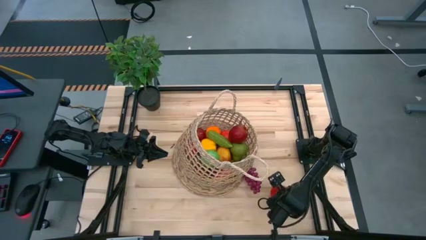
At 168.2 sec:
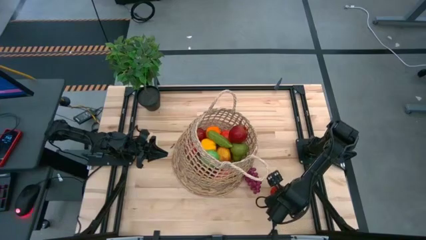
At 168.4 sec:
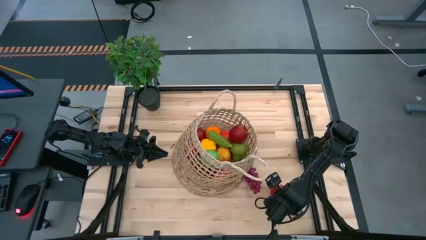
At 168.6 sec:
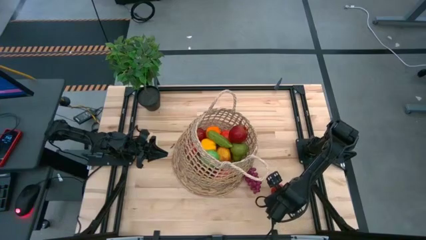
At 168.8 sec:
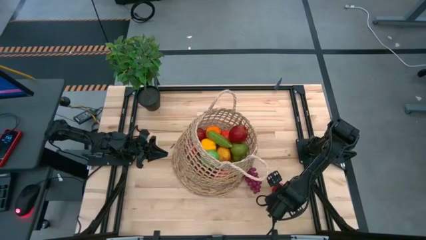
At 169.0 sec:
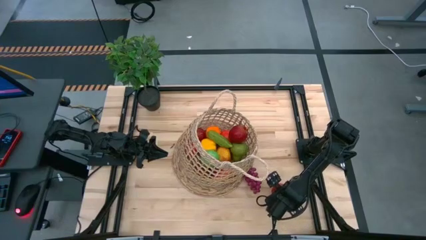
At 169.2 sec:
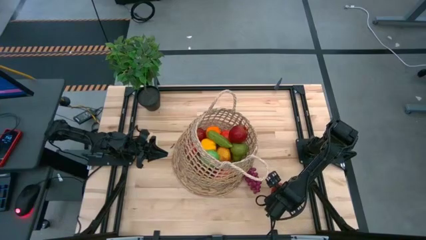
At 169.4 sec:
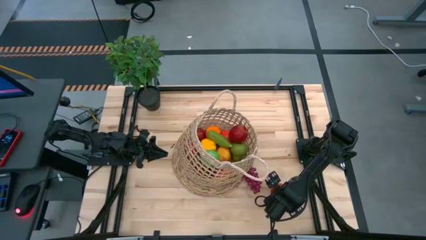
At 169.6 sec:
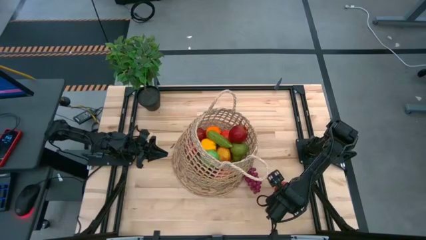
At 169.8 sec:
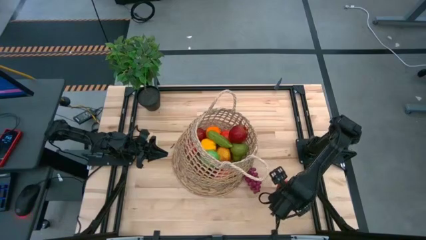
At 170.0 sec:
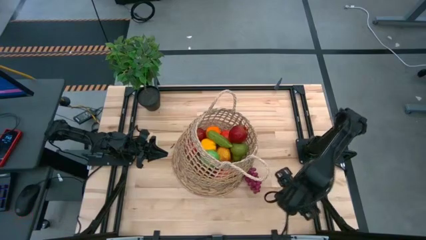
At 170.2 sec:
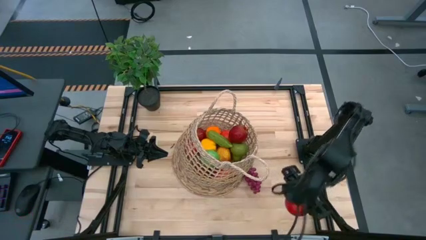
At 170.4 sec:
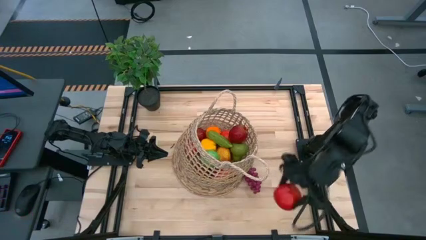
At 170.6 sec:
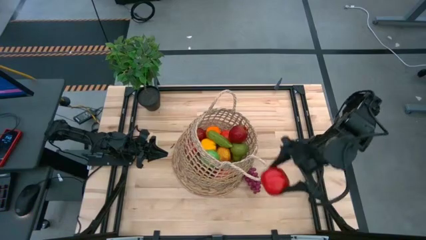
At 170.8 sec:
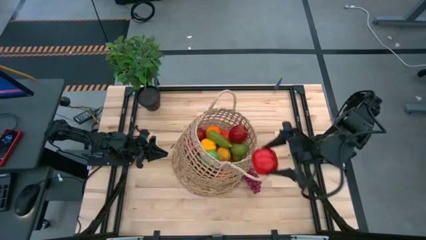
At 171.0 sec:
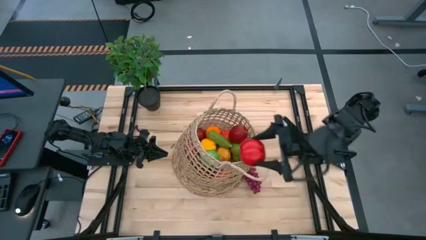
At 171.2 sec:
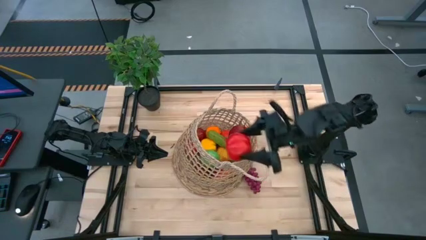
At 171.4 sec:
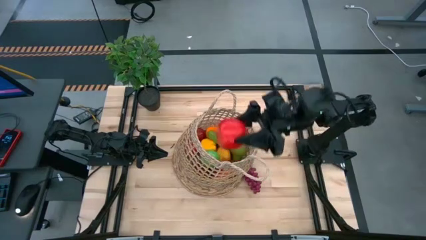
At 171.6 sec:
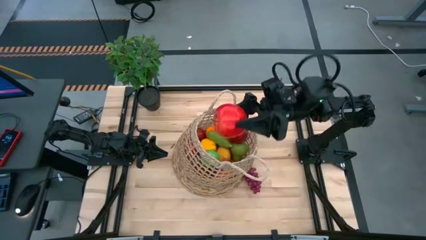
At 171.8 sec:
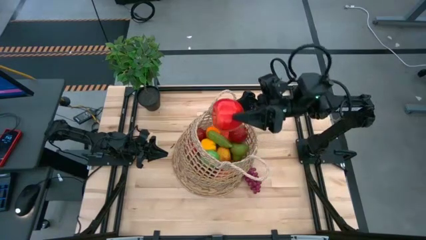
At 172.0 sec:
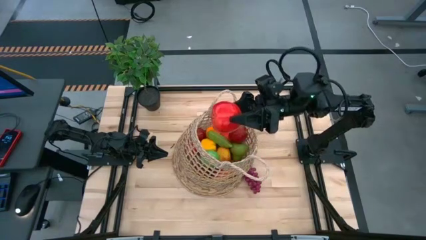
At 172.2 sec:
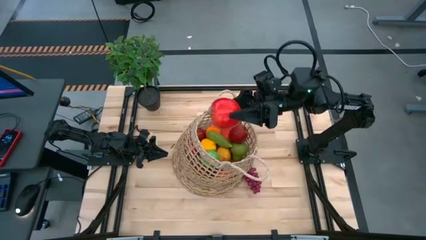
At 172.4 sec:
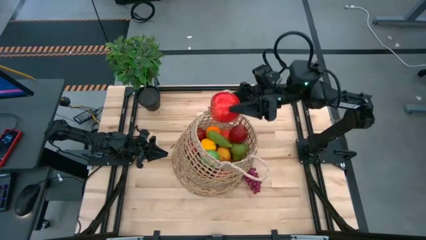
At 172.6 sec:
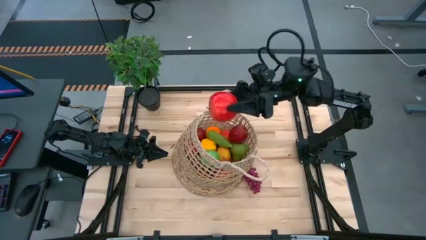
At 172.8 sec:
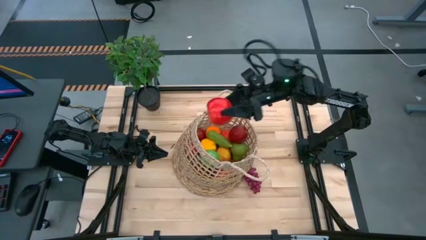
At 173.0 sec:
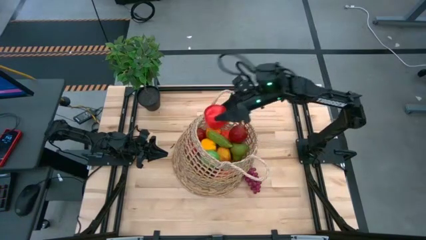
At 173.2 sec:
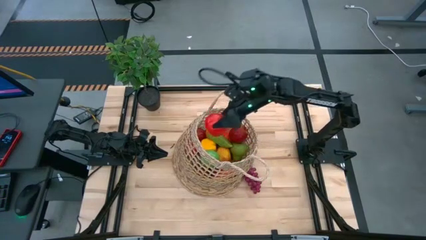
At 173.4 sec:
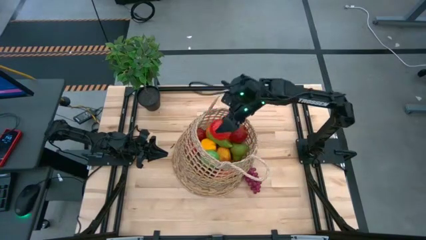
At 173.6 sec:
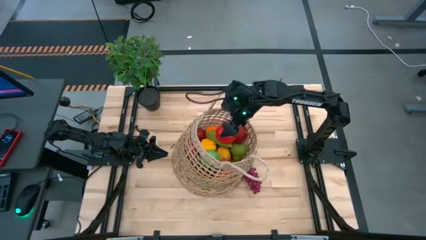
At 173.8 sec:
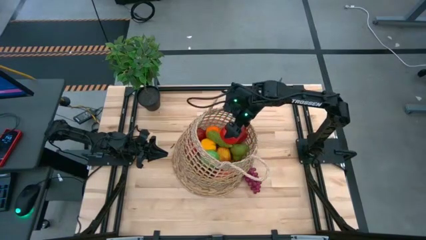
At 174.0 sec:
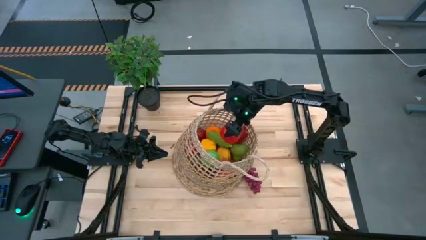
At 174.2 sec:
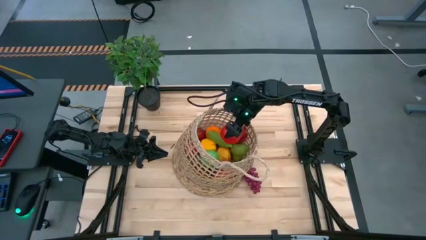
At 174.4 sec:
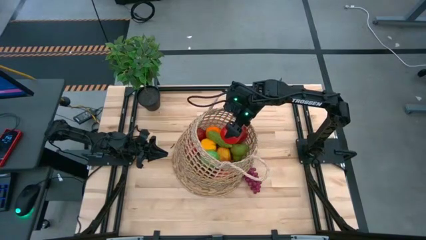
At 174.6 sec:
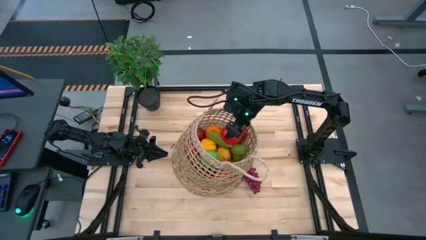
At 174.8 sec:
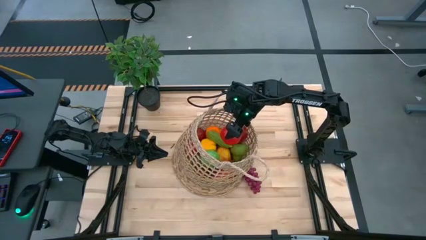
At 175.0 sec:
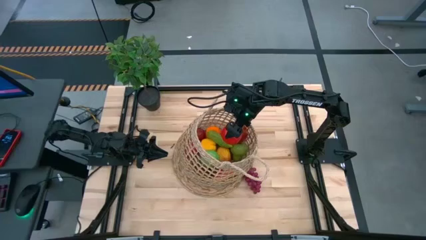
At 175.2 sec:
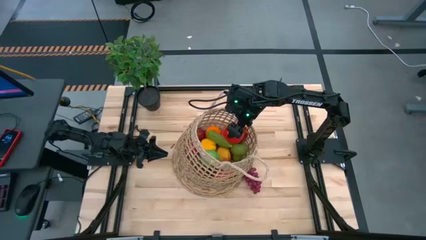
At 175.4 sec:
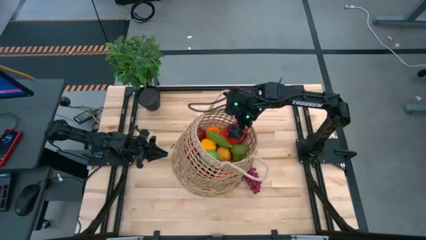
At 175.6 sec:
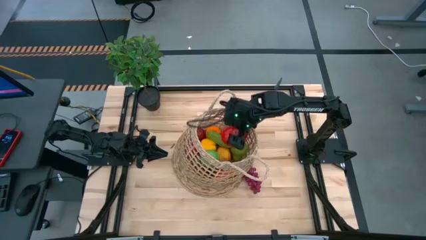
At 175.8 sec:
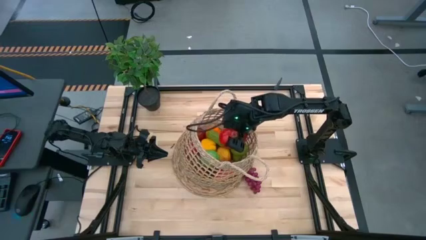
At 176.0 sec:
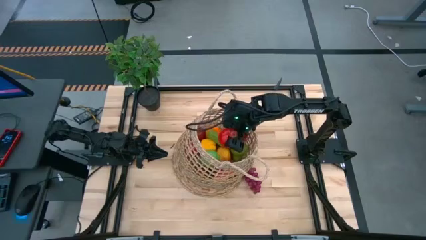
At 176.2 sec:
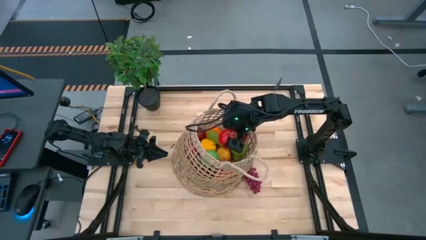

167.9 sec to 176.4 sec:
Task: Build produce basket
Put the red apple into the brown basket

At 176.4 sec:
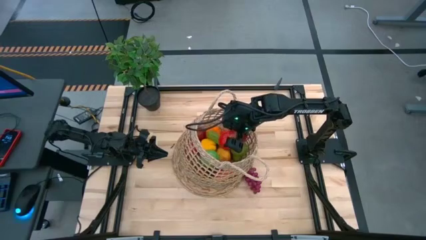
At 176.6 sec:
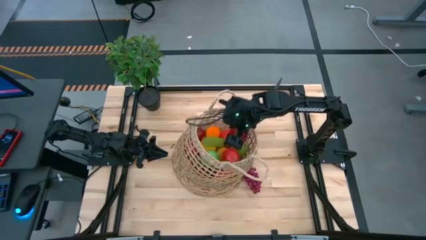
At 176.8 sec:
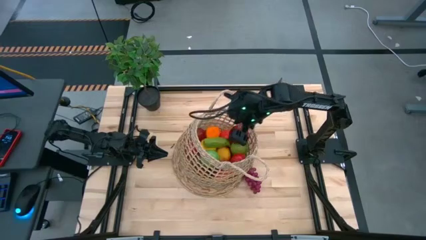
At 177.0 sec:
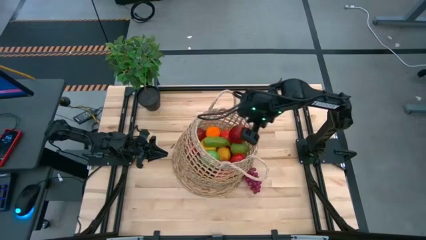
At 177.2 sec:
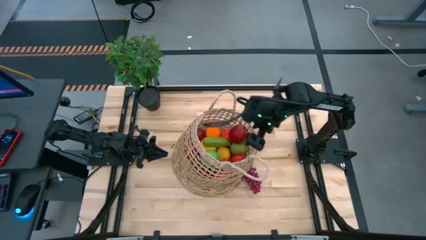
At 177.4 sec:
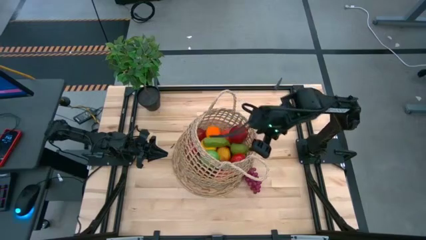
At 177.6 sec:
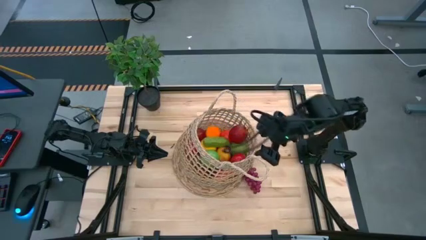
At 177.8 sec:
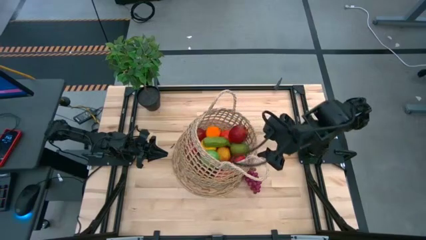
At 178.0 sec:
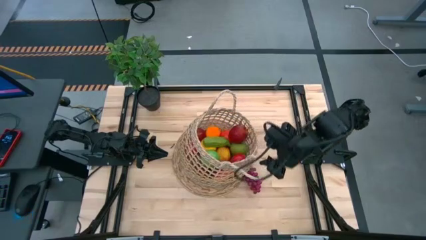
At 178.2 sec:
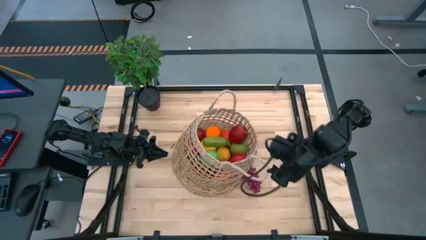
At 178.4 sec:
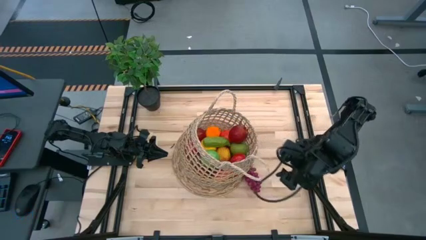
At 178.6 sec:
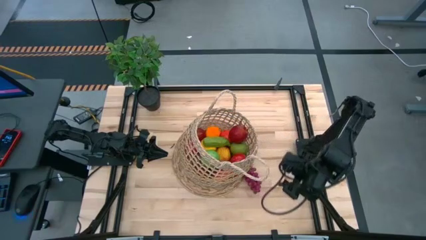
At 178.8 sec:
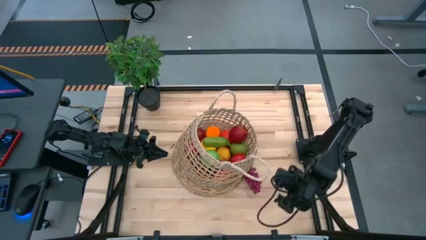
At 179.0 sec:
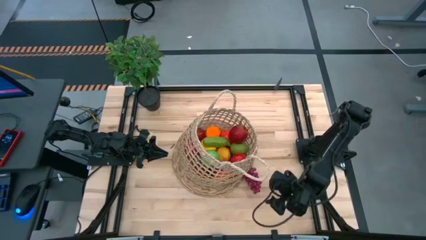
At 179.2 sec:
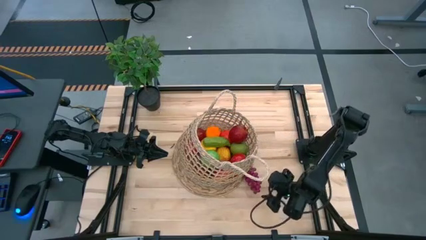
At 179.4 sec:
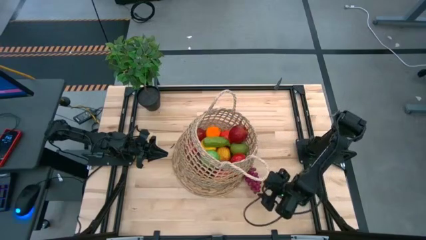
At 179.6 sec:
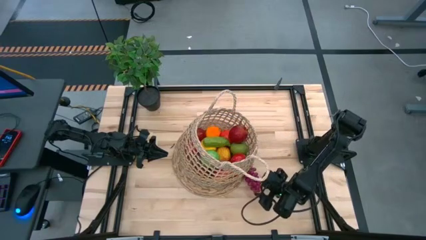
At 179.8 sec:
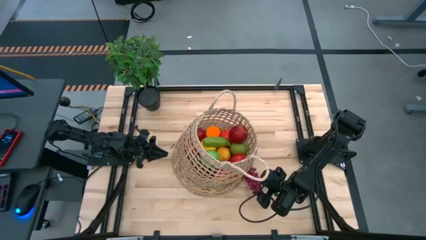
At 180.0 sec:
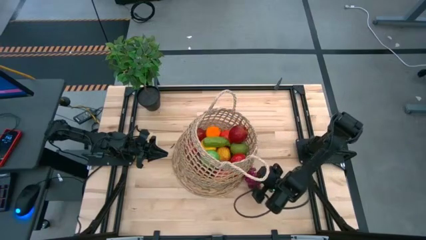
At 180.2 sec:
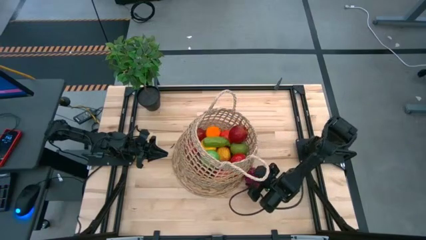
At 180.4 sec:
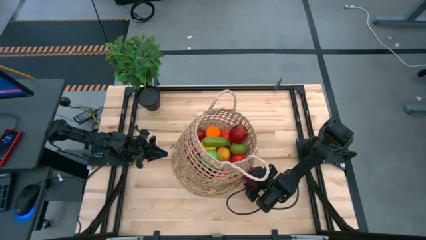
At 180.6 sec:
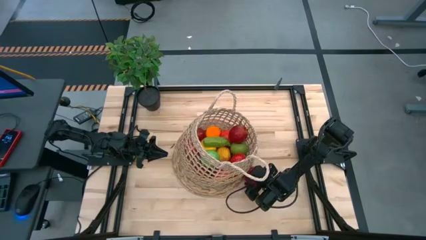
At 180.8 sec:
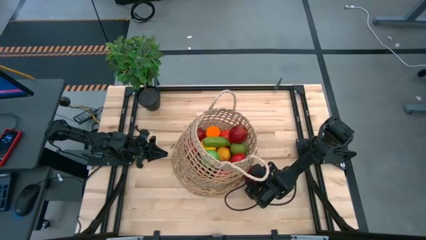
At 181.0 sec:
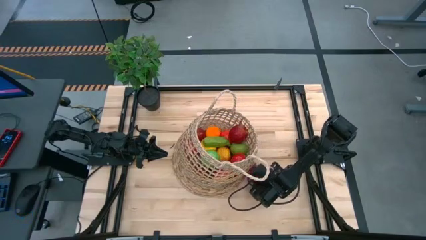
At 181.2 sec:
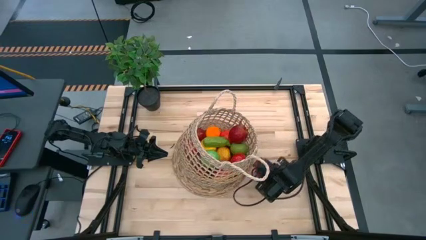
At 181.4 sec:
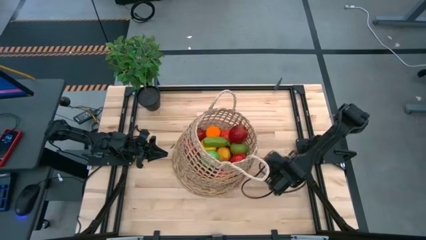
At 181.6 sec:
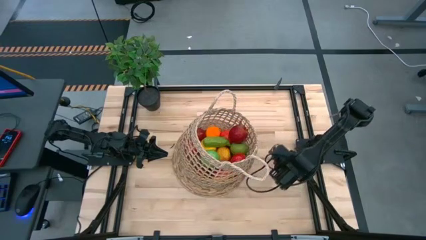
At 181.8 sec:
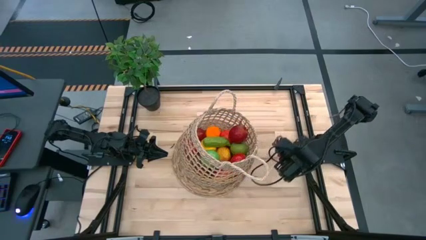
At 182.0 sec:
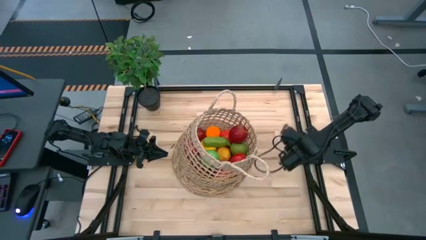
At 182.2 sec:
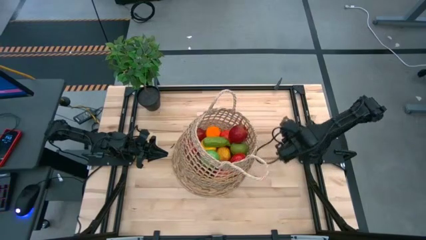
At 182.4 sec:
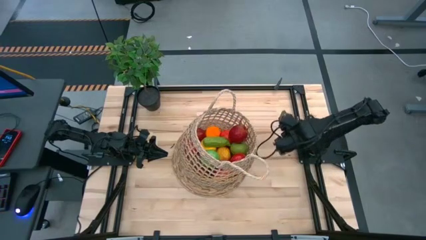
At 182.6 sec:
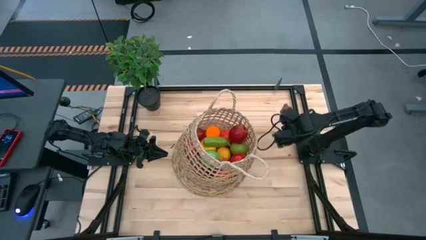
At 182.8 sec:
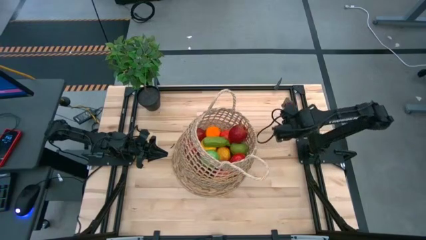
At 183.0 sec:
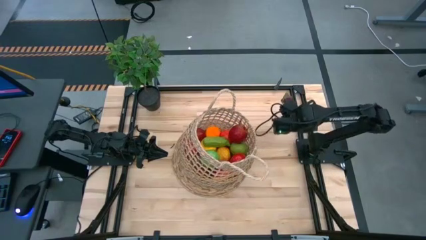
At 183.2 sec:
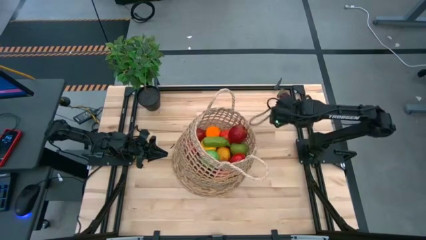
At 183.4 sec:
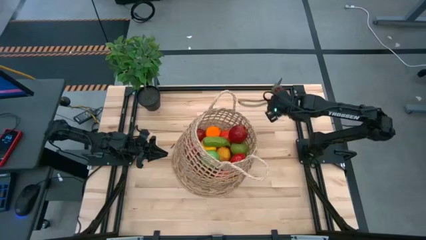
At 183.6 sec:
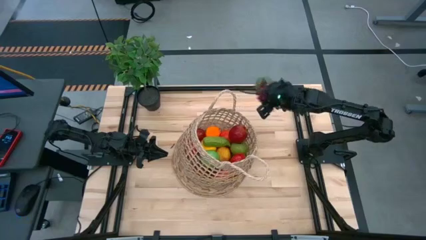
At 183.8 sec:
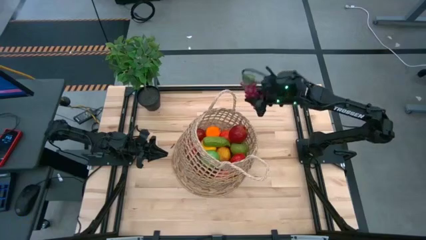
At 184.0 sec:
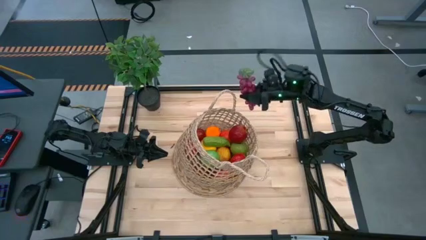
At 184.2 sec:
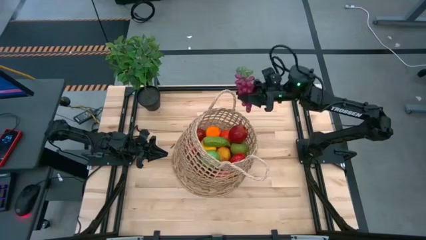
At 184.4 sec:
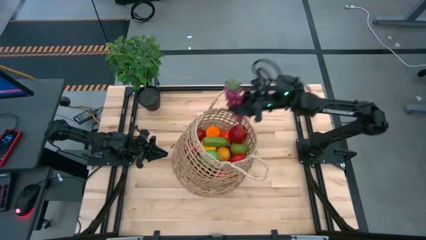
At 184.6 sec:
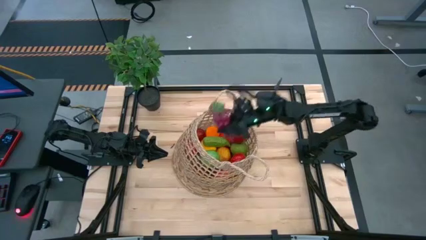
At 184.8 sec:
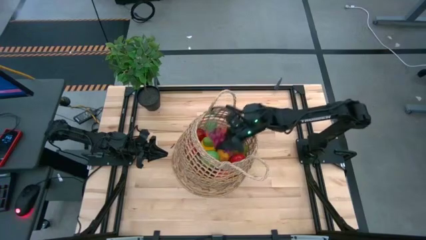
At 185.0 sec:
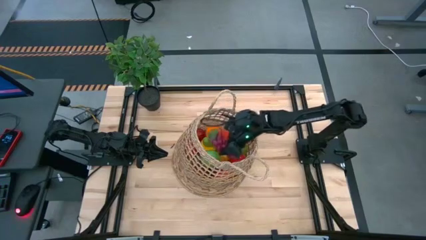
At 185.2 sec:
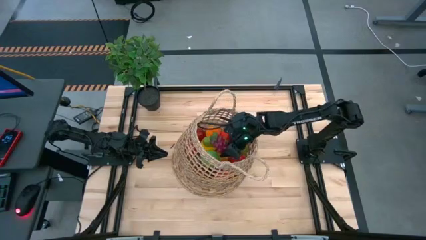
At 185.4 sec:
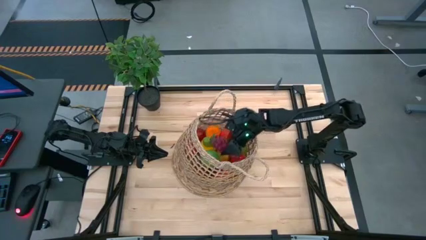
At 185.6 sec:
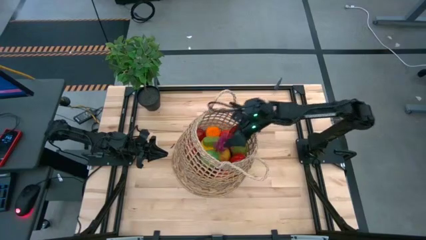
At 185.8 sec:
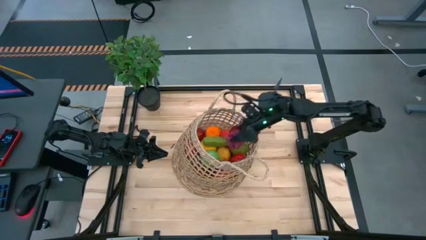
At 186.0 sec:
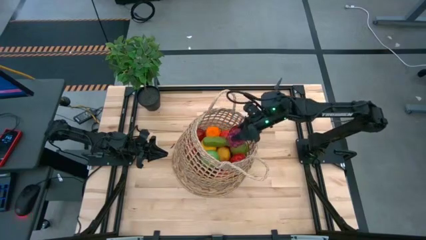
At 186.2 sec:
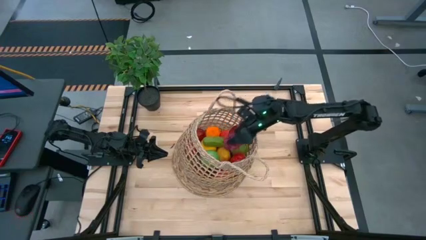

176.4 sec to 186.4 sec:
Put the violet grapes into the brown basket
